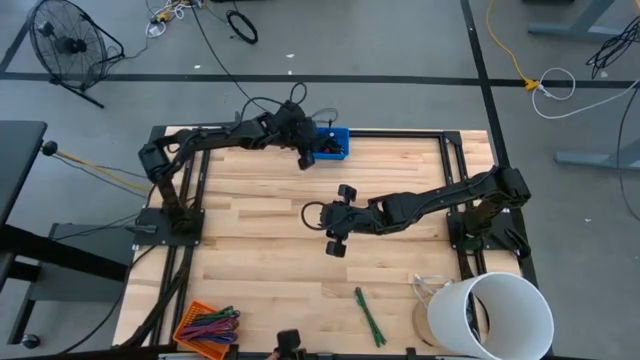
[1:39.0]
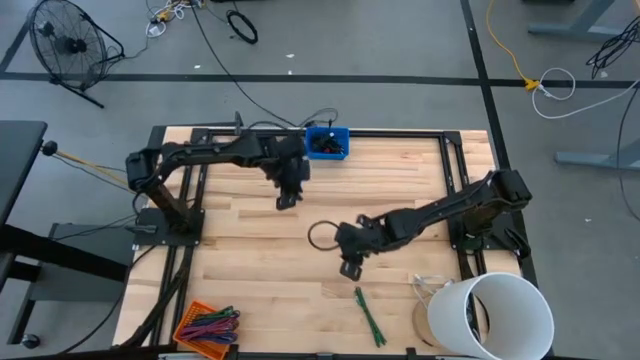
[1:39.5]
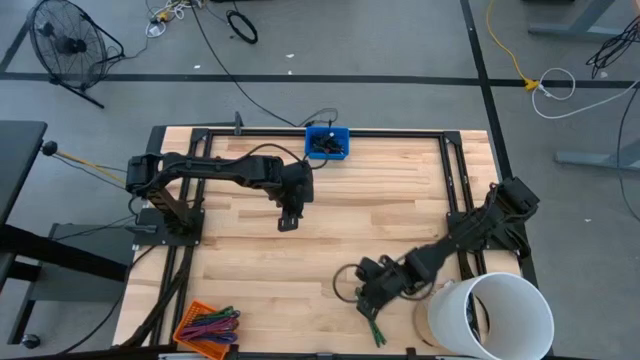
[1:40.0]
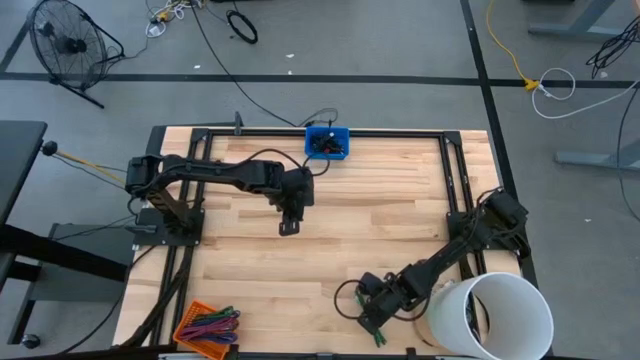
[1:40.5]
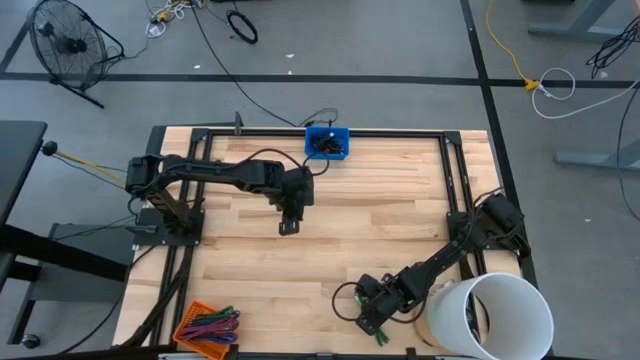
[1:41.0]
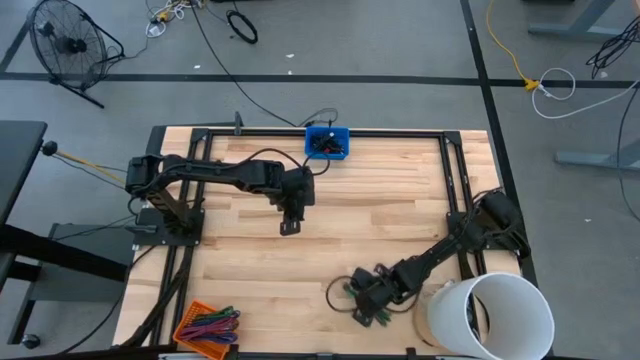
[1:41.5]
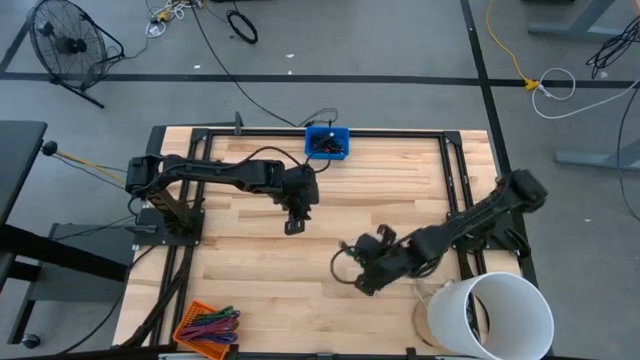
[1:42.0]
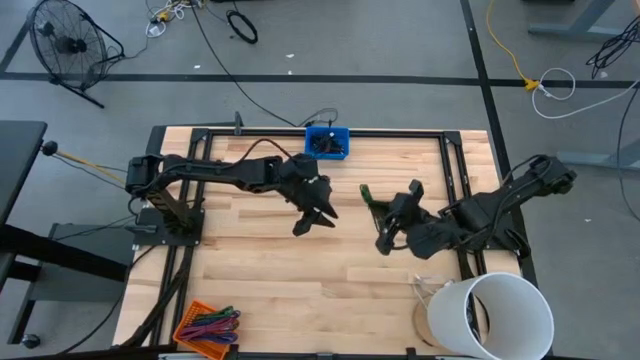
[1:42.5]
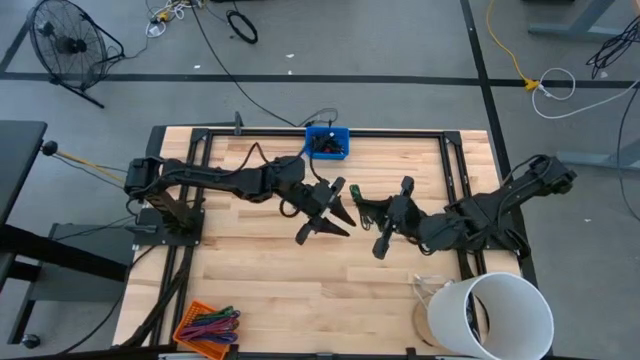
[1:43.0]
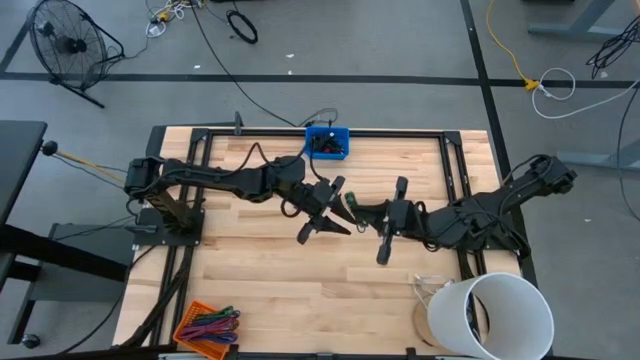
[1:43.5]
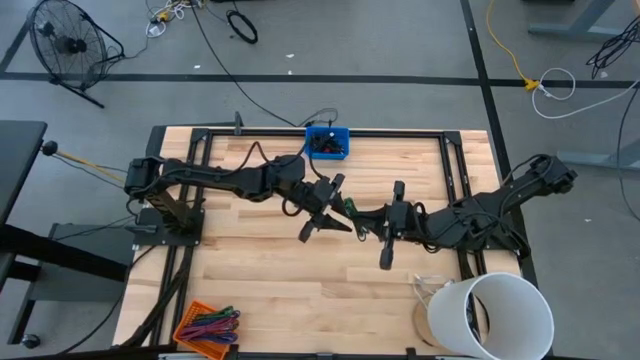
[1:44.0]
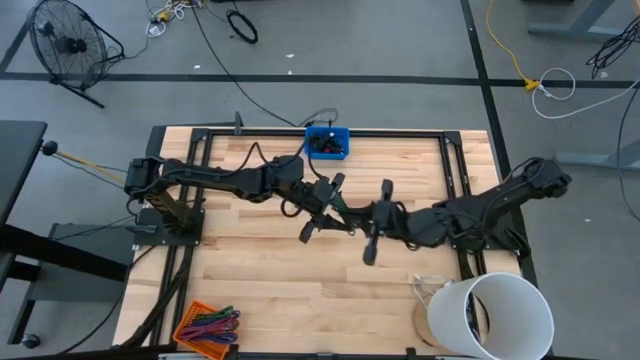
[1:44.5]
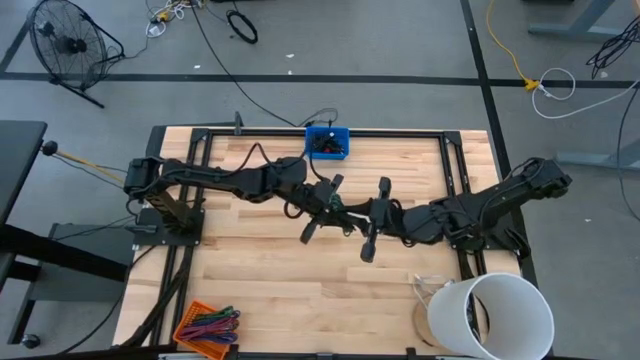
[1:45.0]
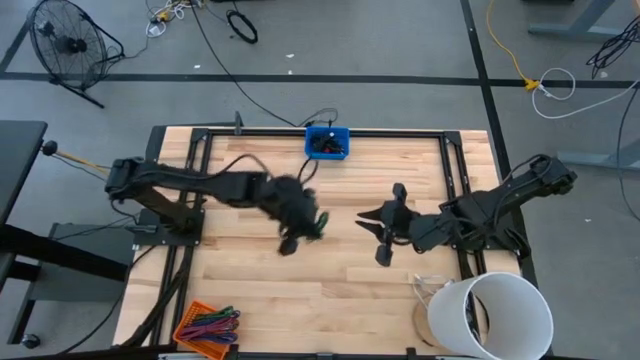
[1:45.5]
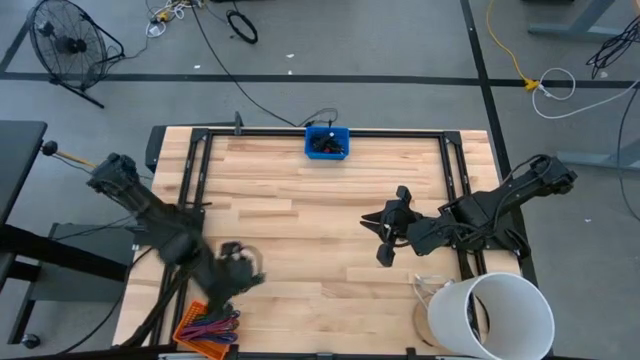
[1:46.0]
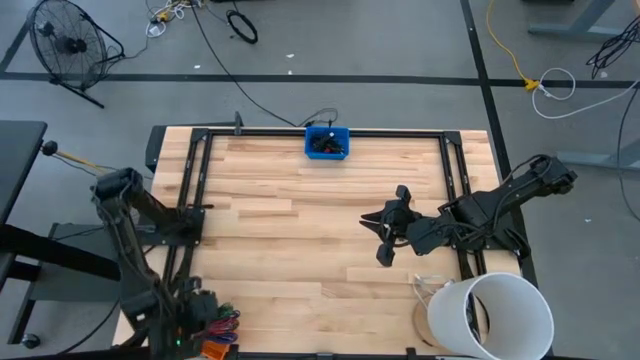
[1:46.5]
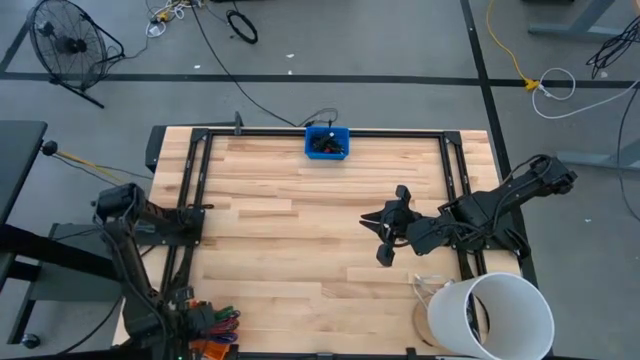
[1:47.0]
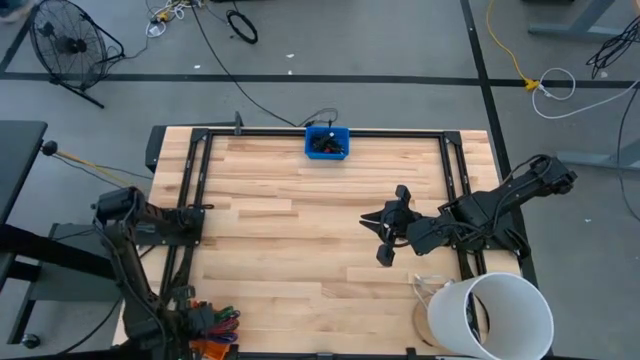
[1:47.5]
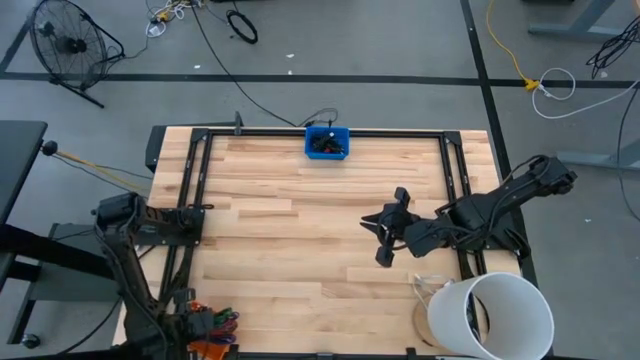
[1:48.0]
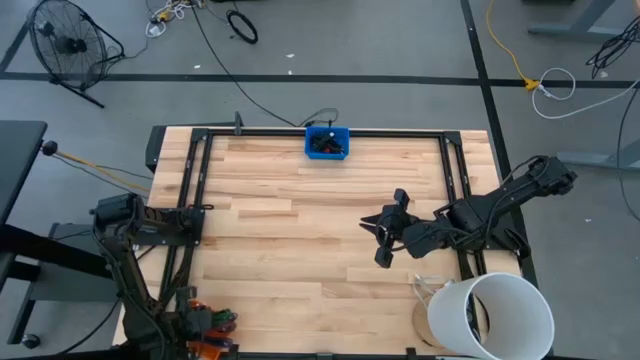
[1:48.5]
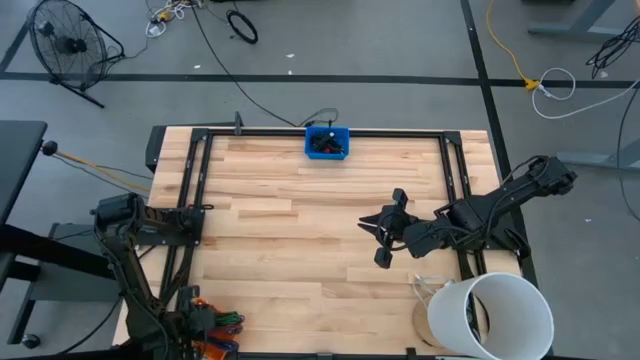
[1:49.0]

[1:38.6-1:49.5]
Task: Pick & Place USB Port
Put the green black charger cable into the orange bin

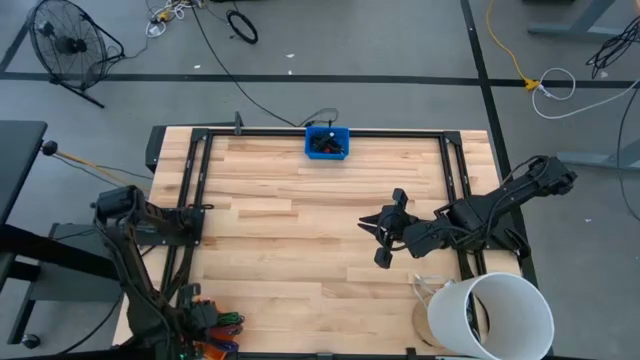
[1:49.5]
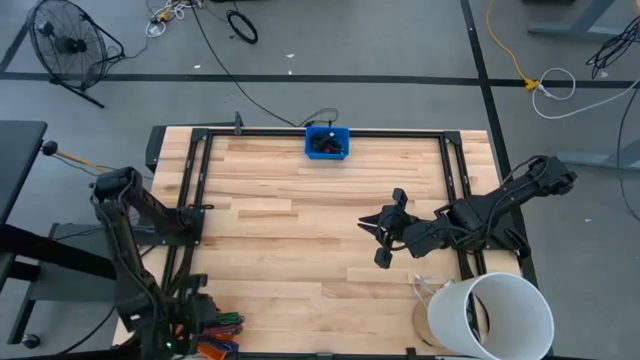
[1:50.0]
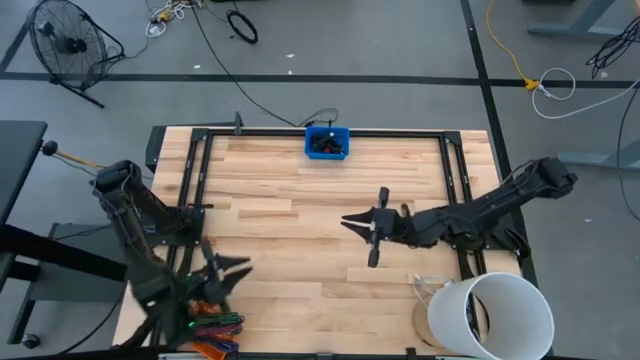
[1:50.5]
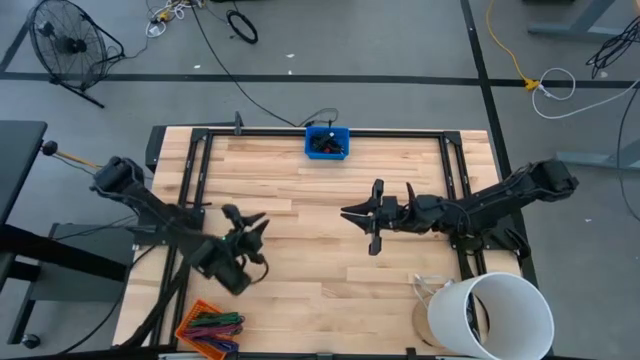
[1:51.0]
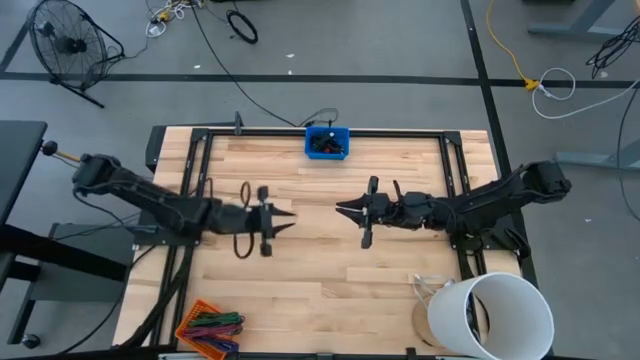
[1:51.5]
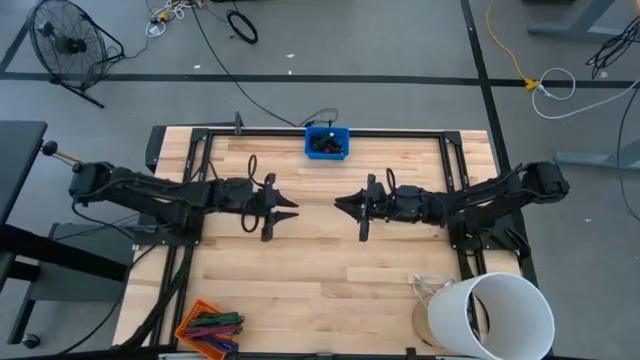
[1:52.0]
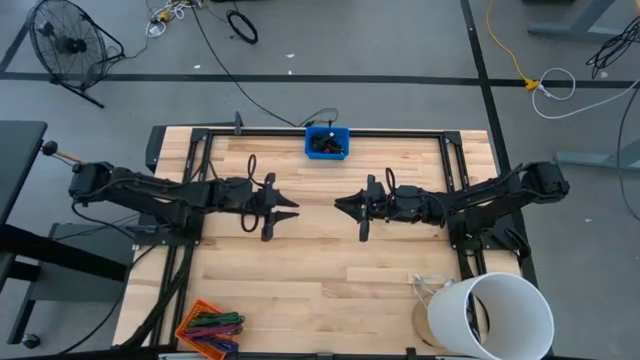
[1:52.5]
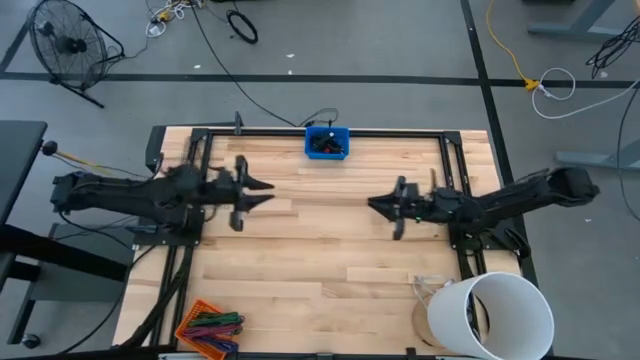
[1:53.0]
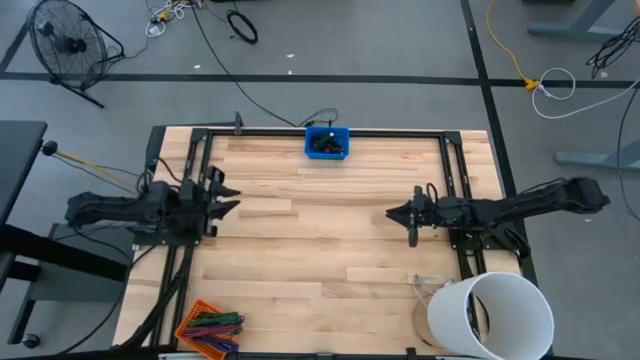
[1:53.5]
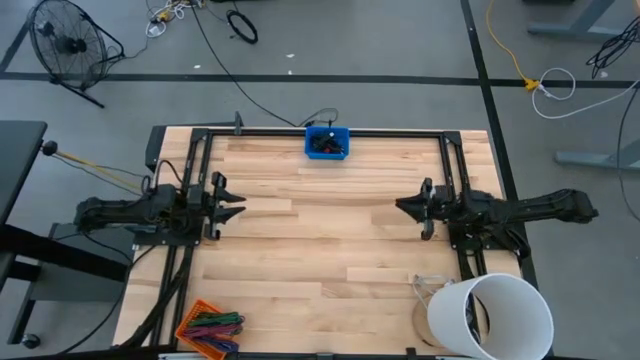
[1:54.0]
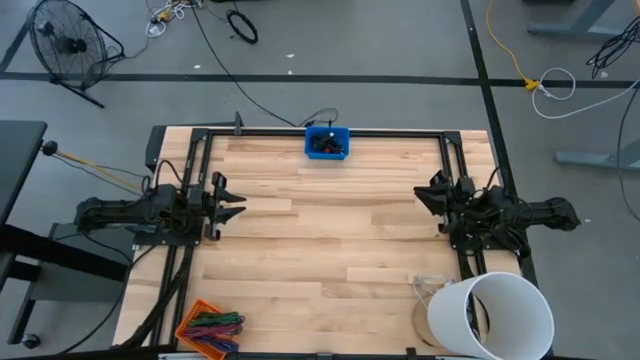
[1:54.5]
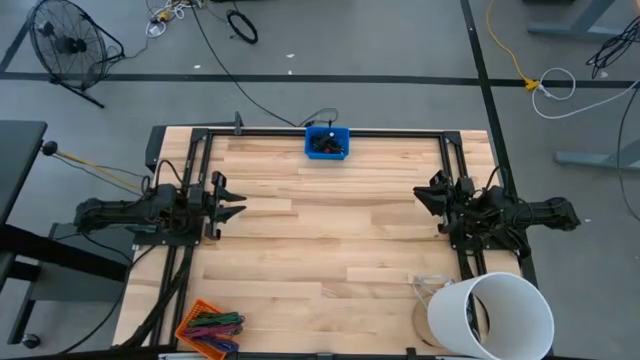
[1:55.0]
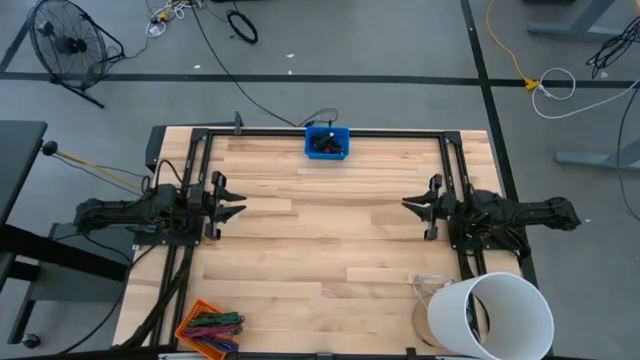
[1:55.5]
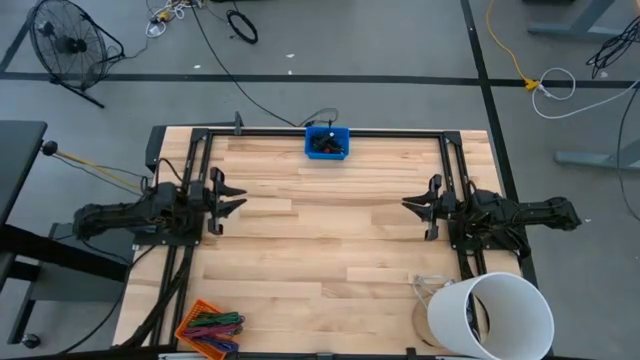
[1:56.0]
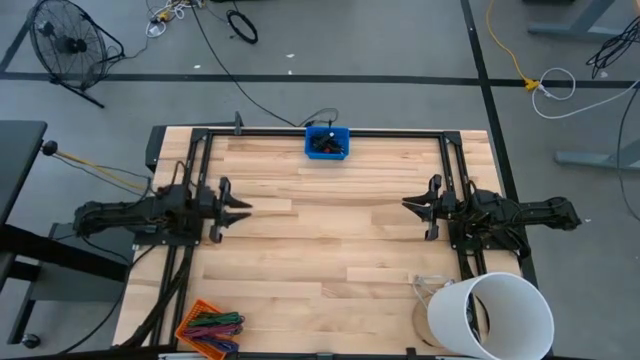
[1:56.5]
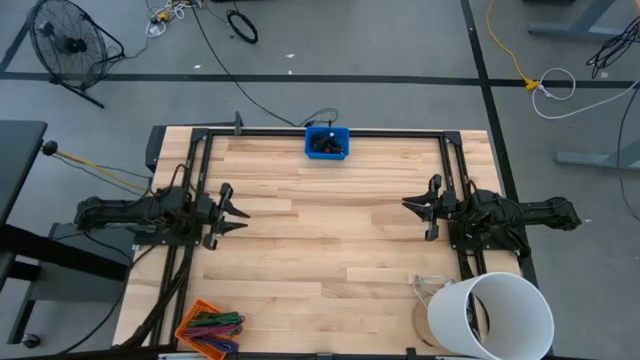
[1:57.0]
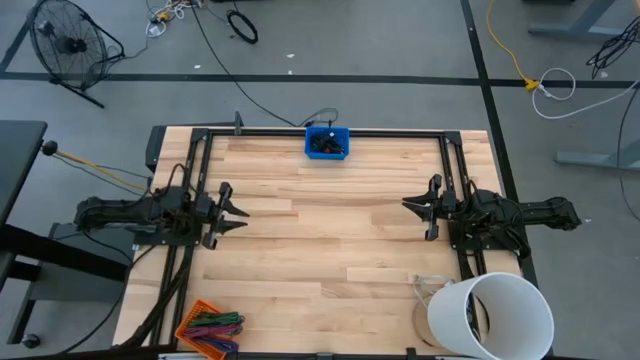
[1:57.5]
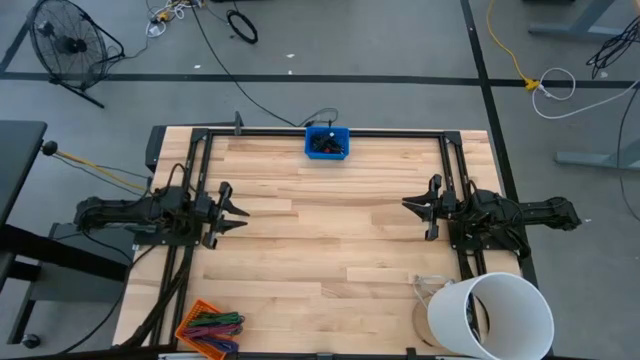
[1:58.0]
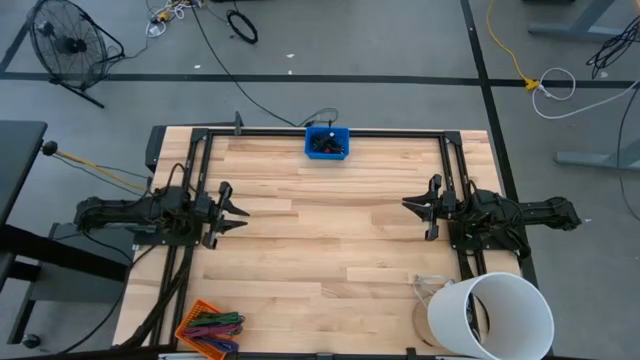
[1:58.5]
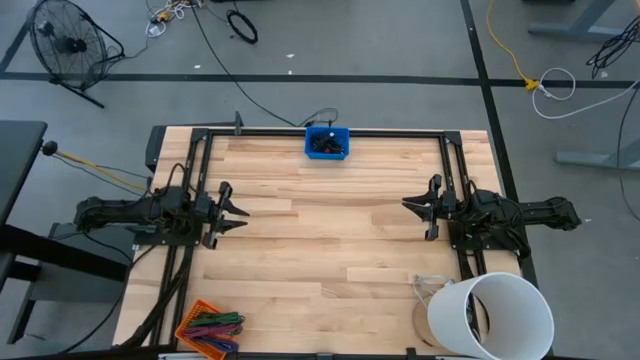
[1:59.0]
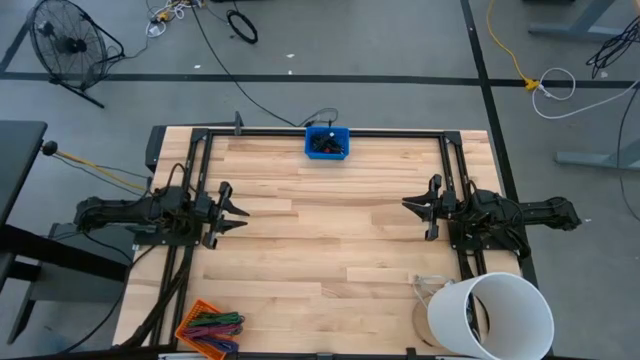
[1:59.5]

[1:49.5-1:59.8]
Return to Home Position
